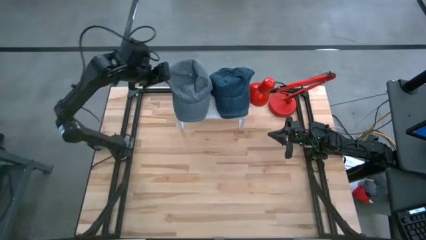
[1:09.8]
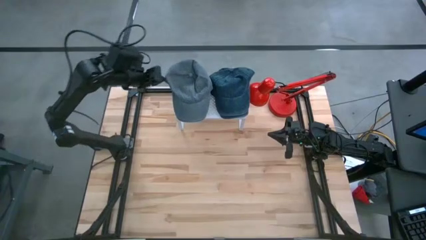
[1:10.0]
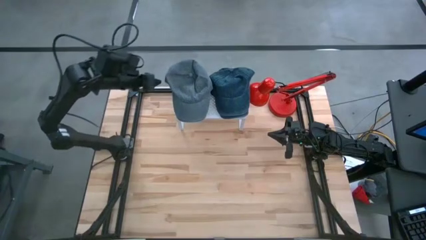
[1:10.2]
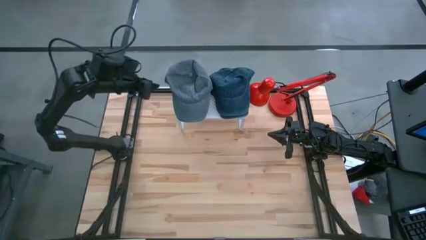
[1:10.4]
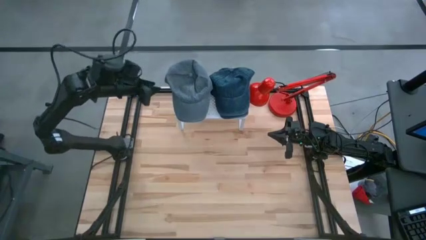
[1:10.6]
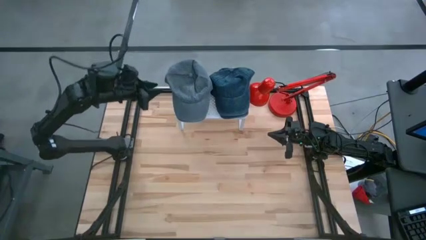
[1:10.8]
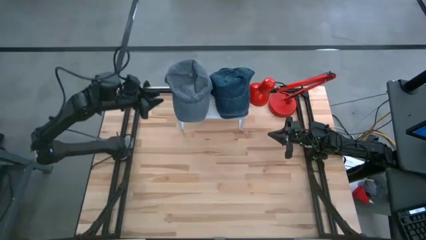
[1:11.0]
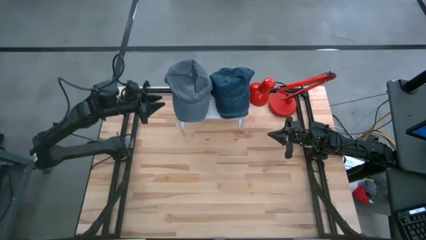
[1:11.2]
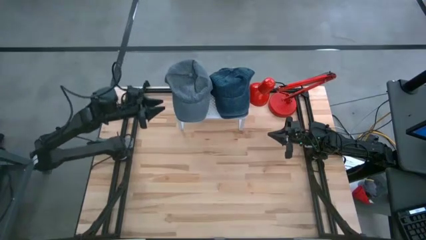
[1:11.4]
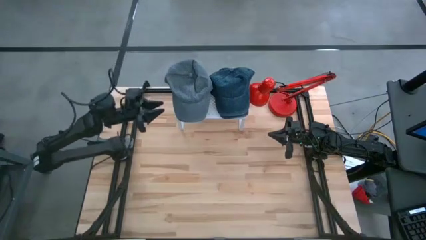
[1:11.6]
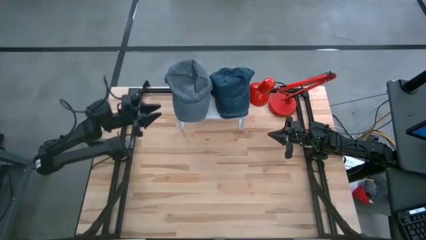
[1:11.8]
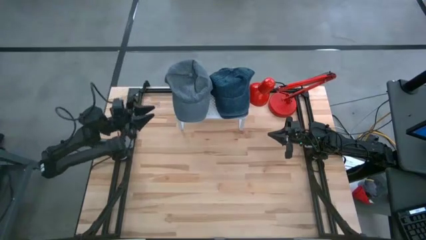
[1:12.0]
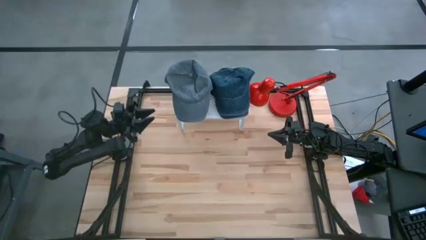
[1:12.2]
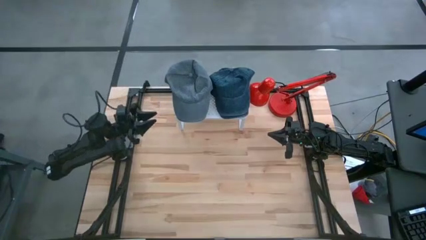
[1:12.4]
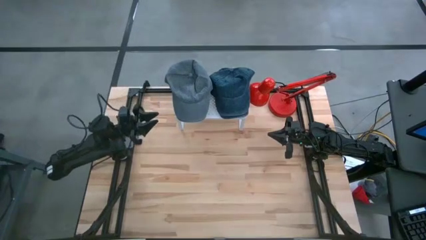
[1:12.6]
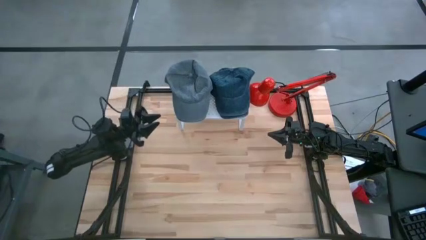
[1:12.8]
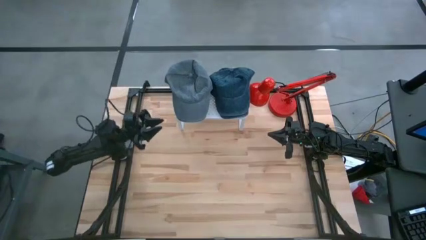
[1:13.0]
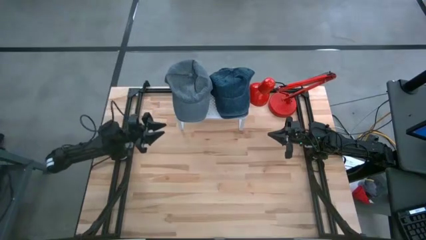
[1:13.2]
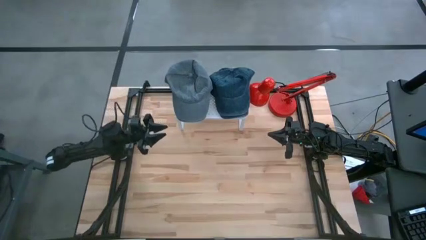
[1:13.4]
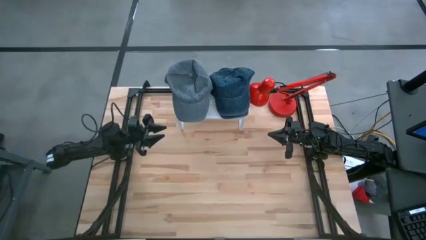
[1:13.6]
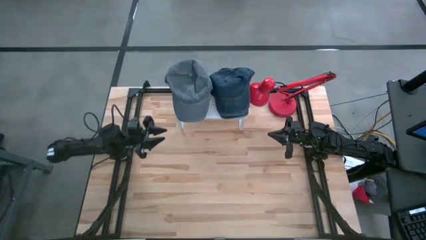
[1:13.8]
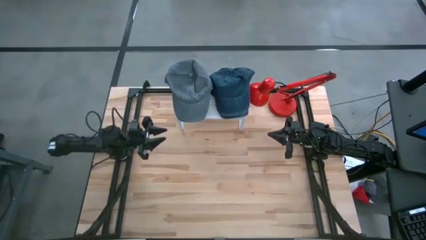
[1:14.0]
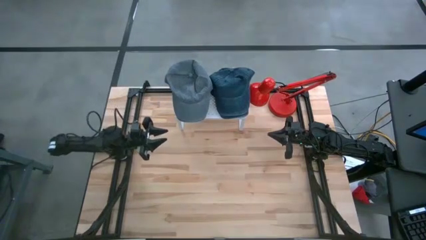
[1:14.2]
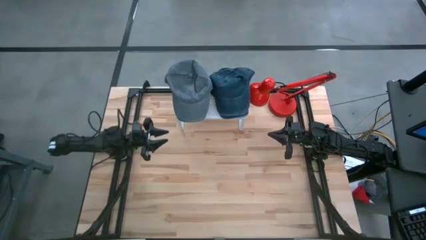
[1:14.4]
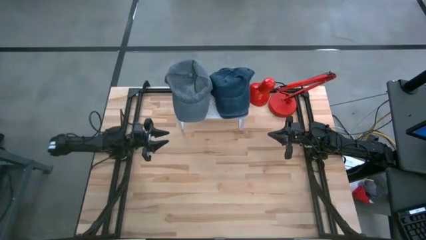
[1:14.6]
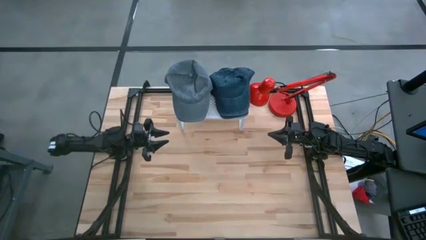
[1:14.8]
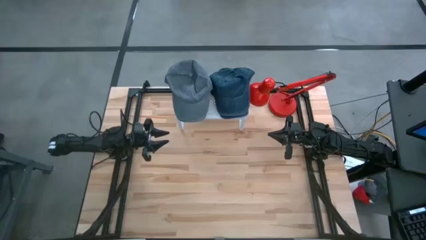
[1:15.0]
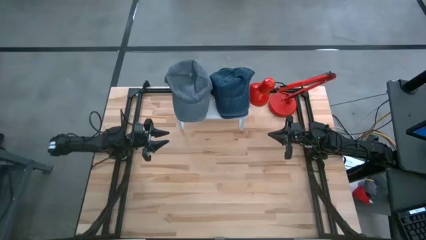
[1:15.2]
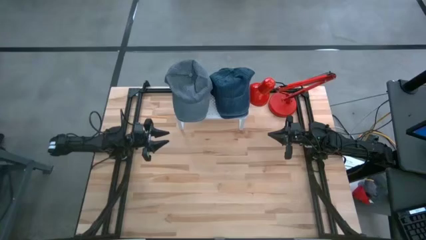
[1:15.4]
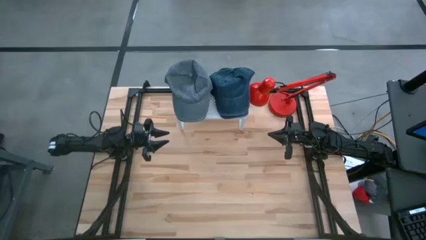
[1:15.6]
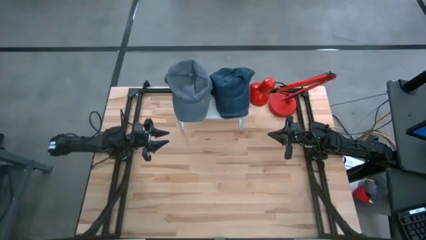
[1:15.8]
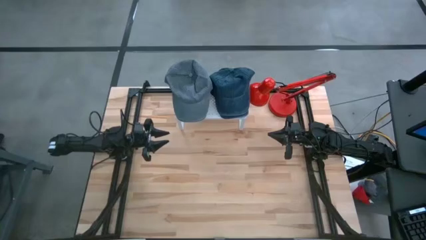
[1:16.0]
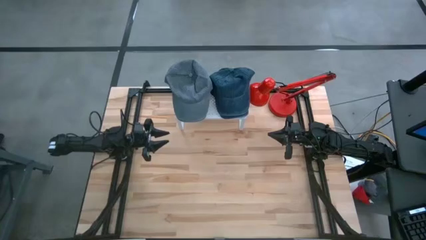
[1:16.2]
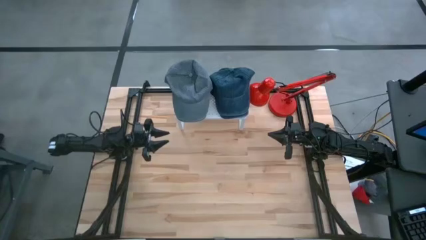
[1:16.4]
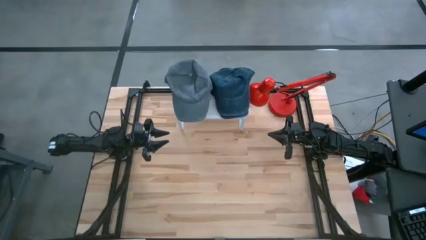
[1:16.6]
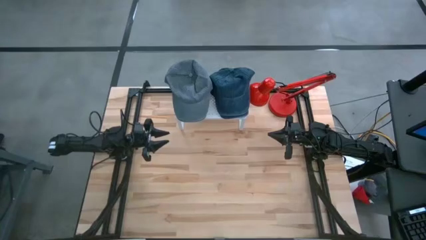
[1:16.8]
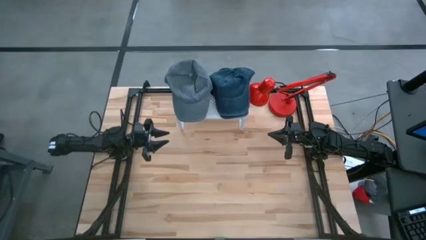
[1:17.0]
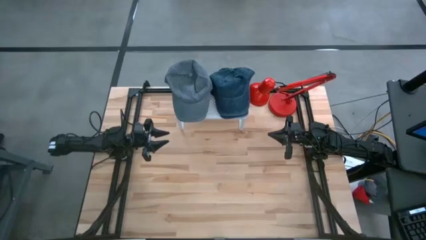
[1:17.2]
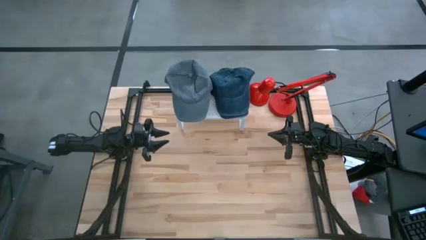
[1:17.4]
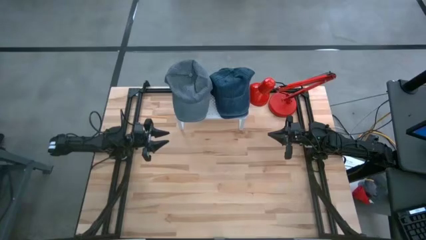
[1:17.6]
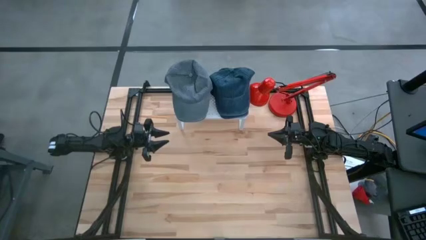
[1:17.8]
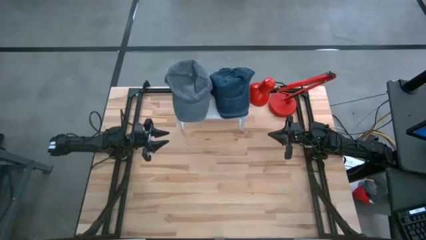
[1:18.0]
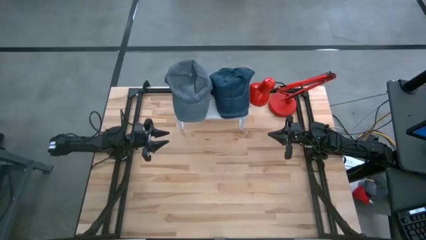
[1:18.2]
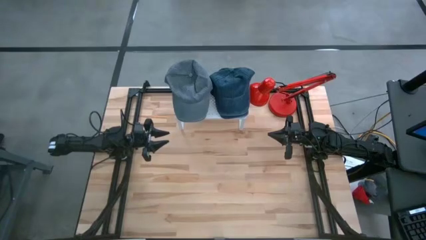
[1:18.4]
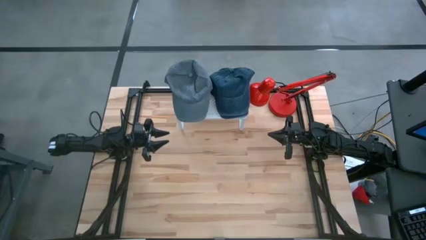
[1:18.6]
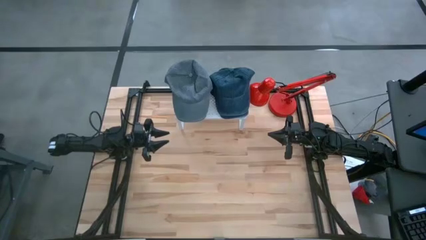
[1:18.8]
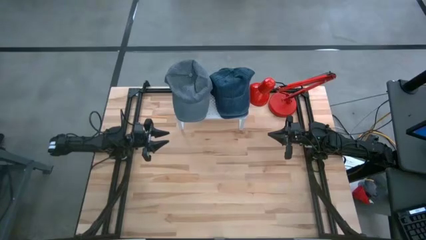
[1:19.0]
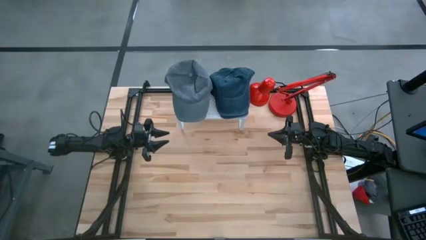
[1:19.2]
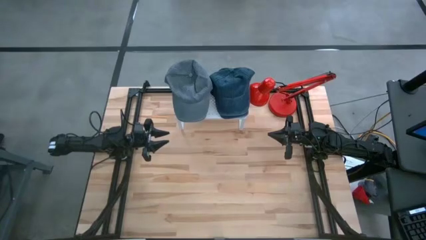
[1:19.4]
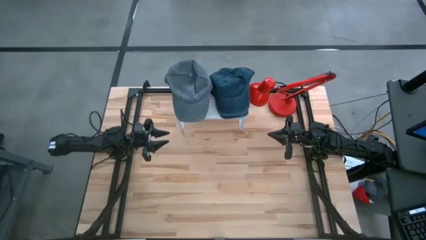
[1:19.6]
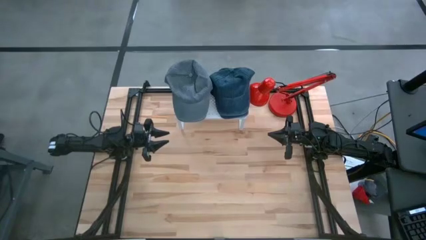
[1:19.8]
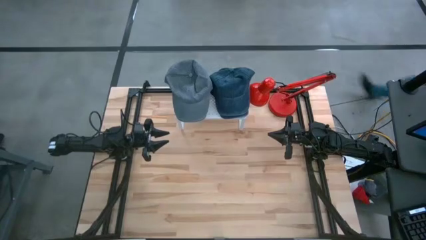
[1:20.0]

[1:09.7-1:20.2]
Task: Pick & Place hat
Return to Home Position

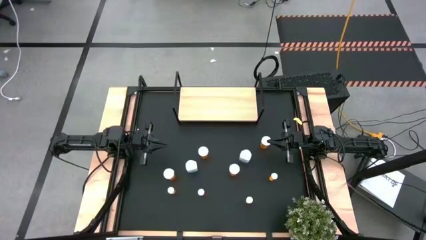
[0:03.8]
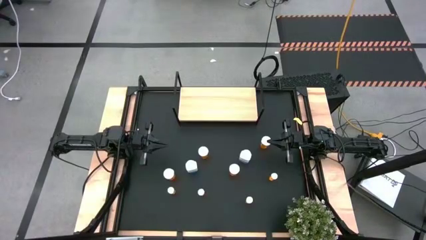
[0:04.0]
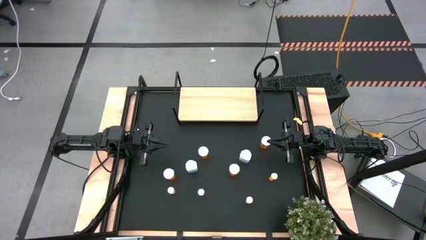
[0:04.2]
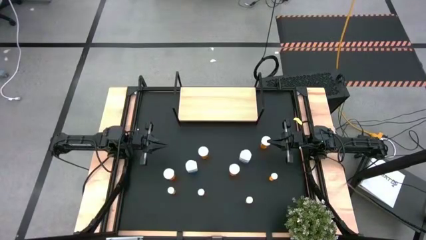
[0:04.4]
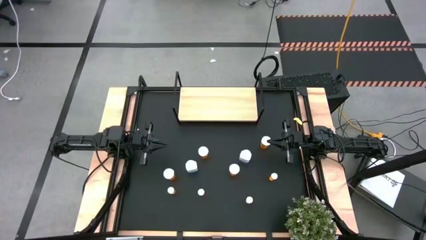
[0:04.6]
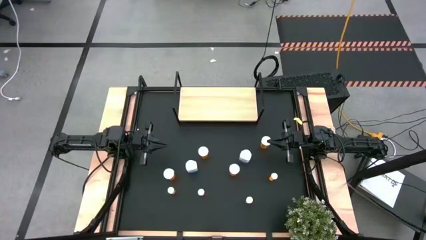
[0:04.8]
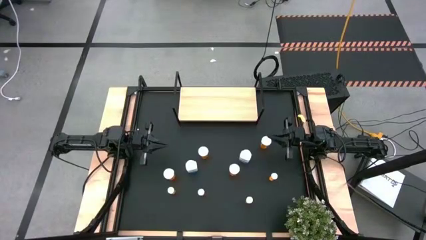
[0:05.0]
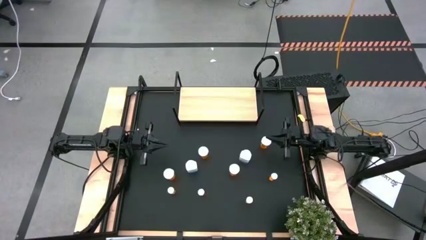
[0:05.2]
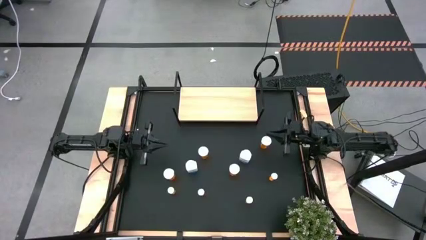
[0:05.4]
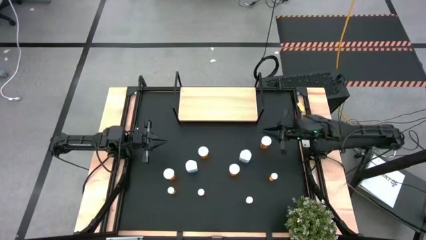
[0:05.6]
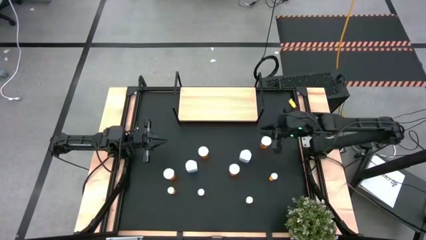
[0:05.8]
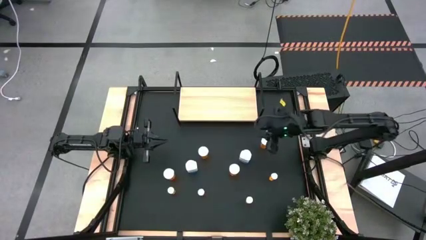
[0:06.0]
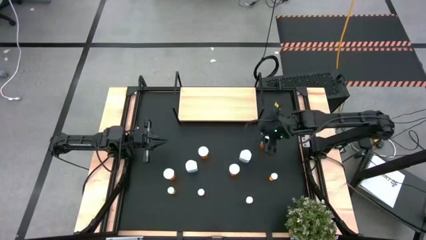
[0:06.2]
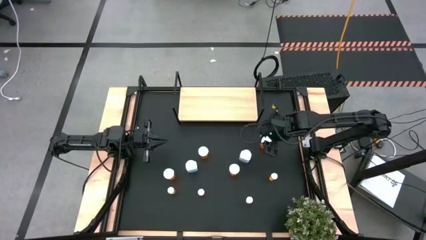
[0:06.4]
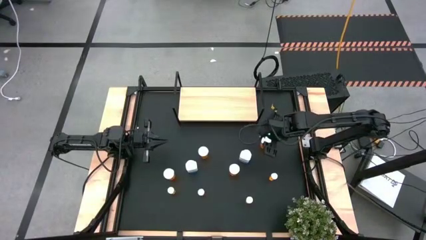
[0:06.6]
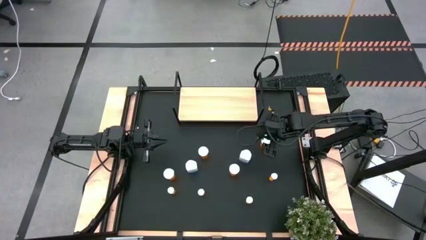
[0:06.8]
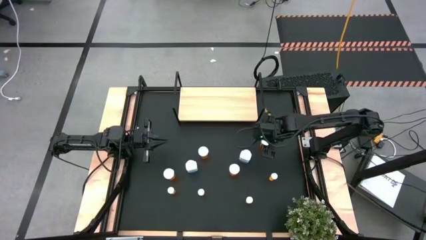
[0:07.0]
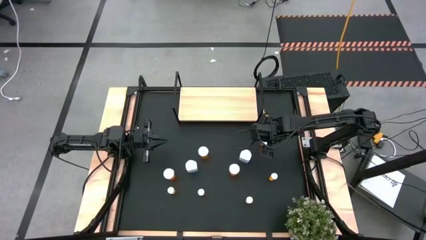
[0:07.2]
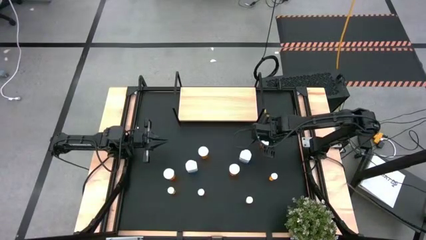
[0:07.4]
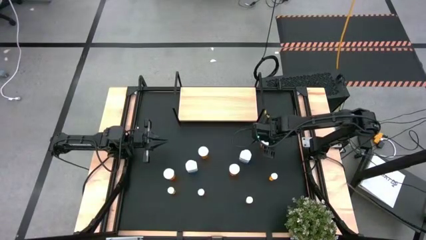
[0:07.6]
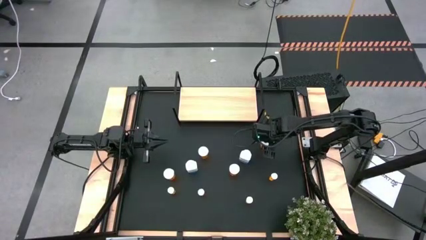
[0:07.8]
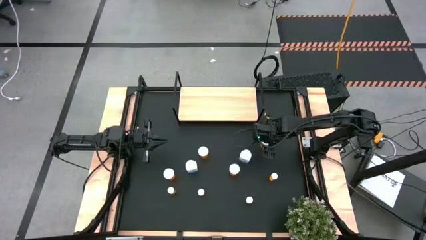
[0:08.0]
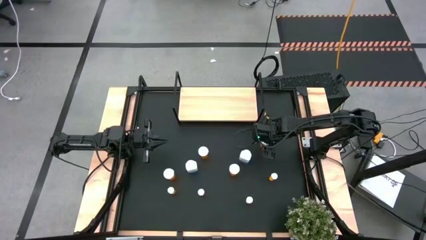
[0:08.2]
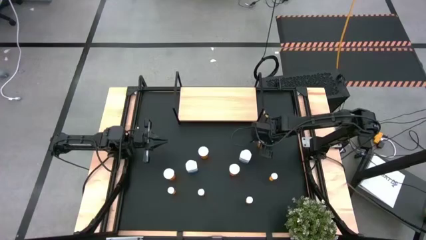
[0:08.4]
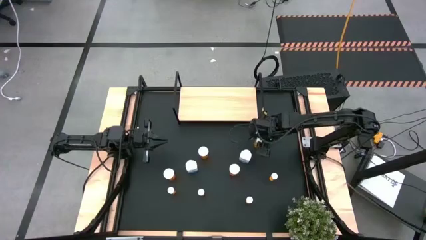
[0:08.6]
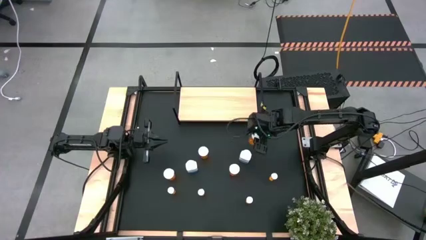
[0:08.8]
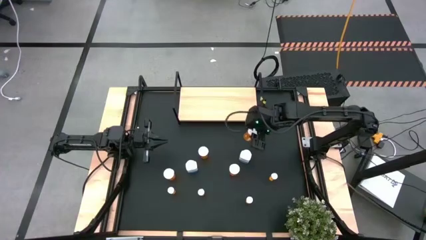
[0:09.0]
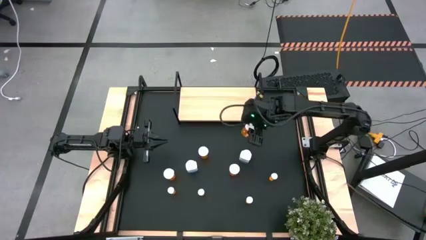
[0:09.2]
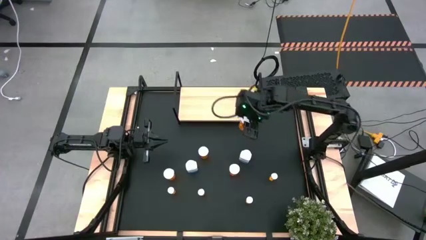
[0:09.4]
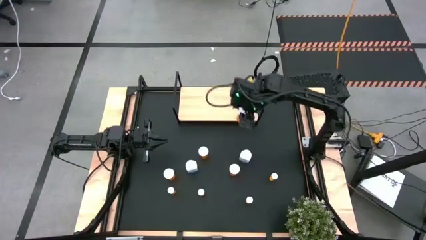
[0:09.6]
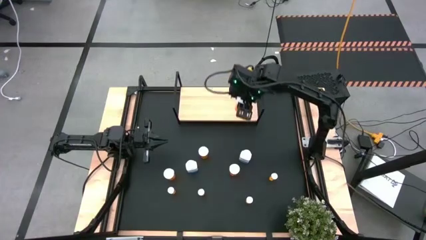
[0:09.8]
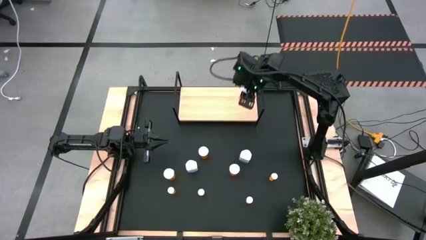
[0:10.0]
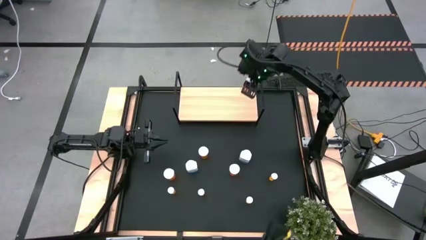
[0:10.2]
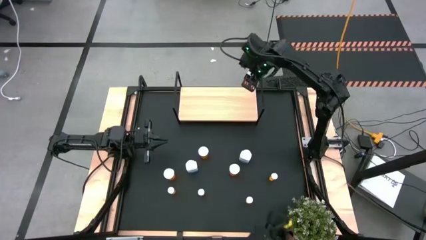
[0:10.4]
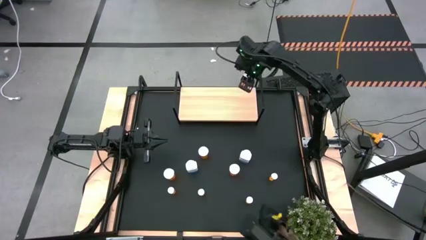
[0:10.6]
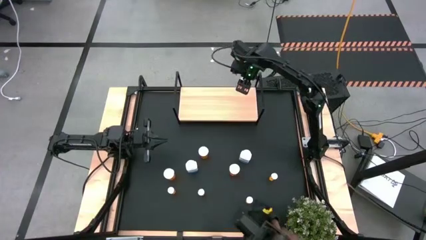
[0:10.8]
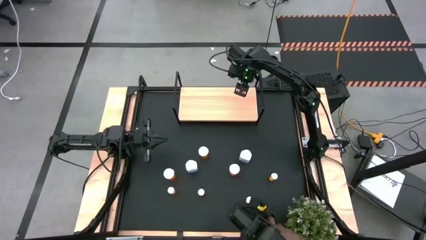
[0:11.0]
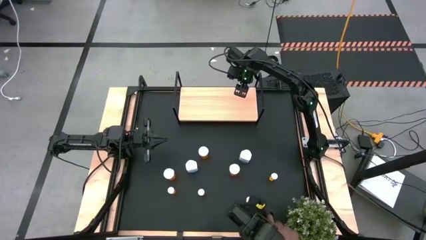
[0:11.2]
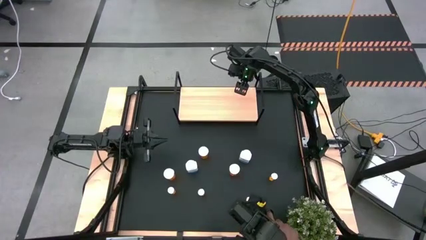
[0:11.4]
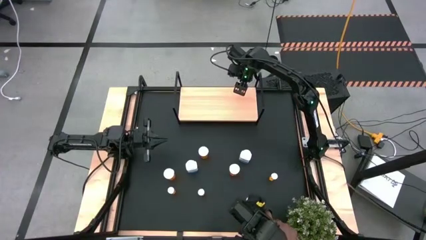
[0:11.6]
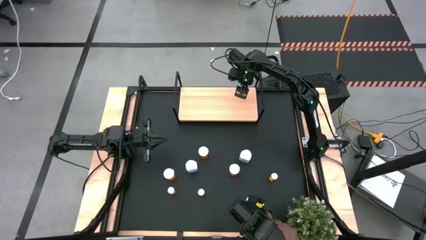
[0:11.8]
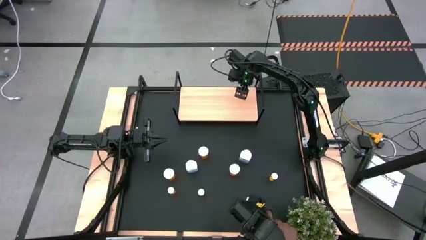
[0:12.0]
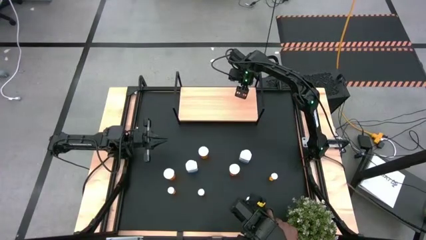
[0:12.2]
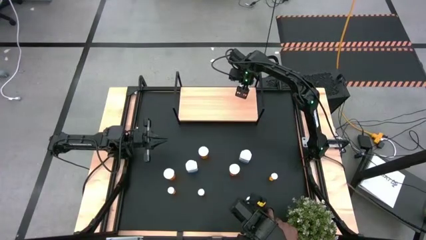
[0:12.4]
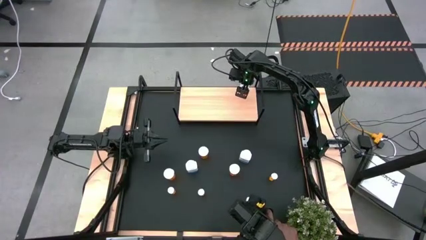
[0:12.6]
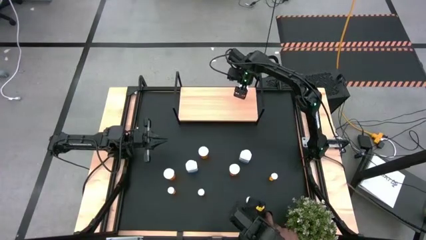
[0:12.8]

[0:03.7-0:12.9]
Task: Pick and place medicine bottles onto shelf by color
Put the top right big orange pill bottle on the shelf
